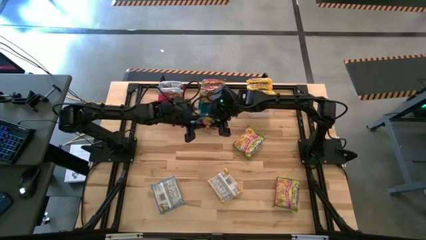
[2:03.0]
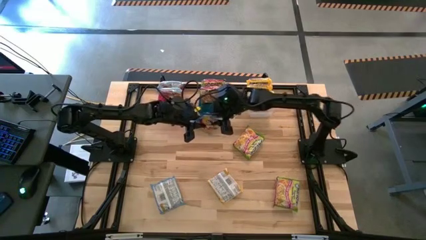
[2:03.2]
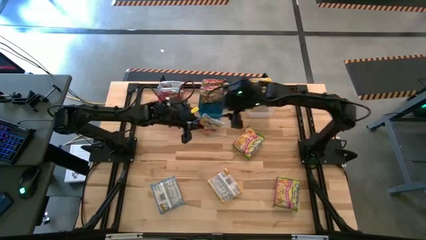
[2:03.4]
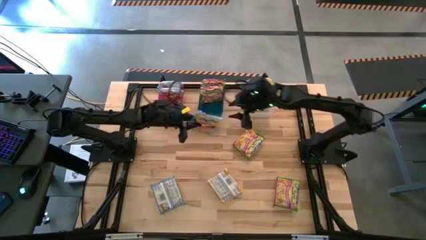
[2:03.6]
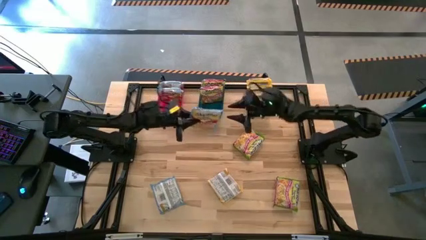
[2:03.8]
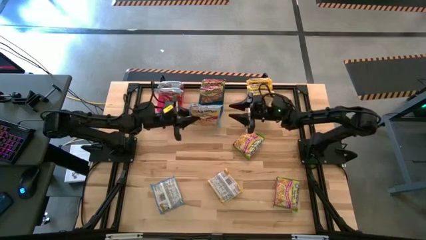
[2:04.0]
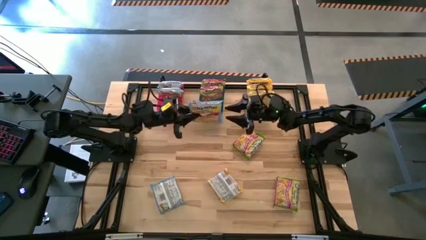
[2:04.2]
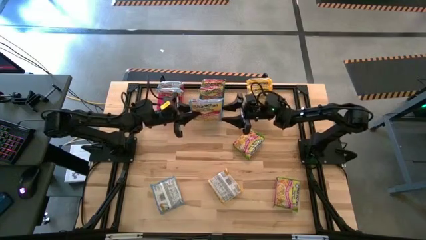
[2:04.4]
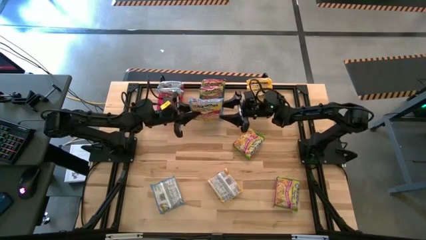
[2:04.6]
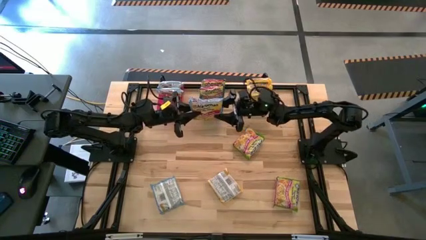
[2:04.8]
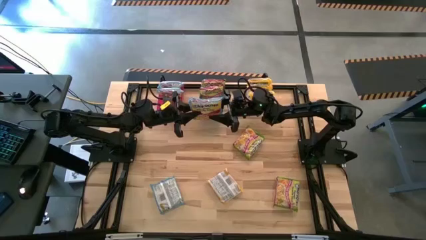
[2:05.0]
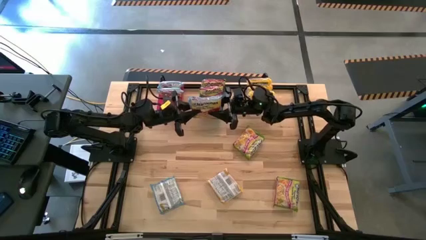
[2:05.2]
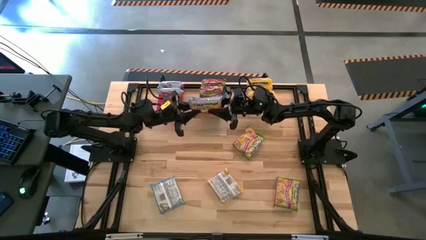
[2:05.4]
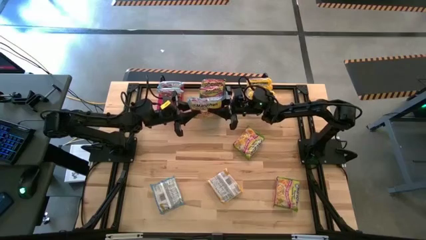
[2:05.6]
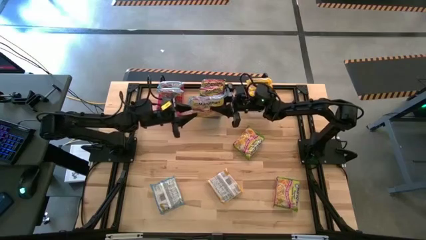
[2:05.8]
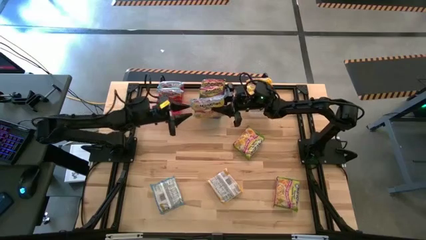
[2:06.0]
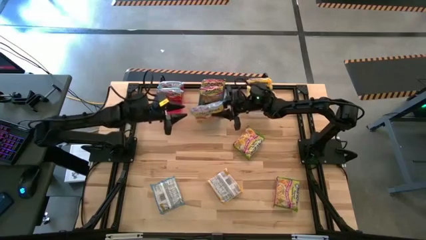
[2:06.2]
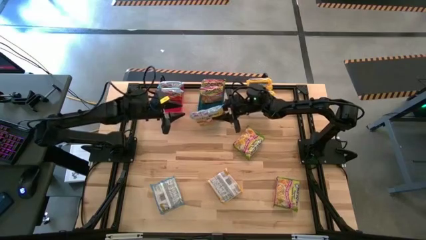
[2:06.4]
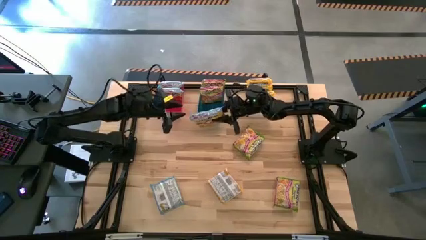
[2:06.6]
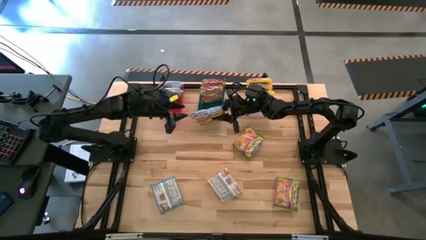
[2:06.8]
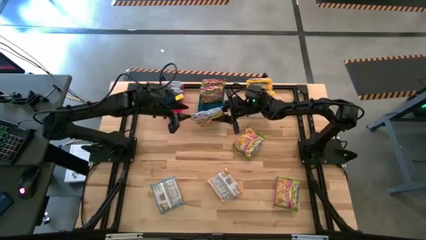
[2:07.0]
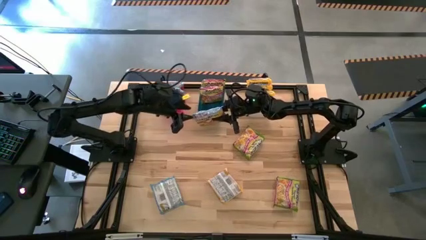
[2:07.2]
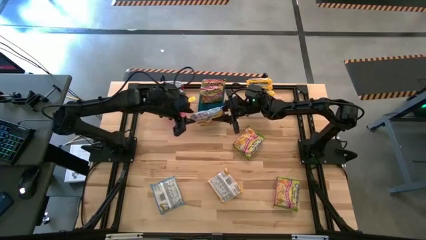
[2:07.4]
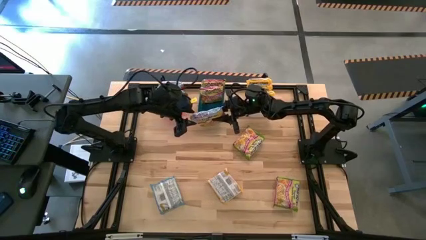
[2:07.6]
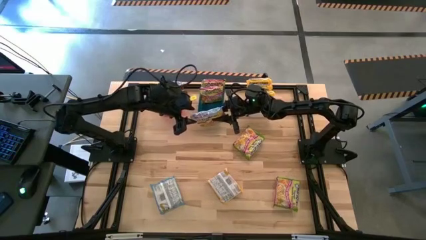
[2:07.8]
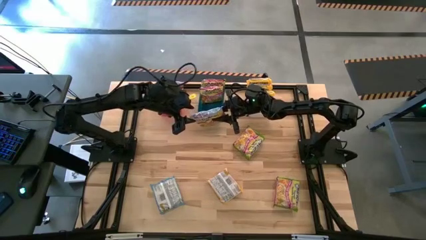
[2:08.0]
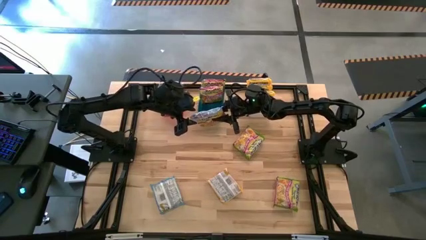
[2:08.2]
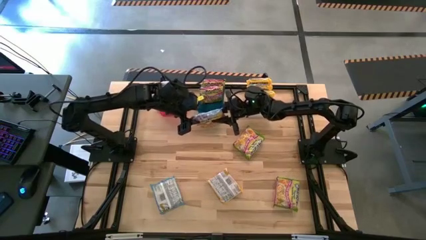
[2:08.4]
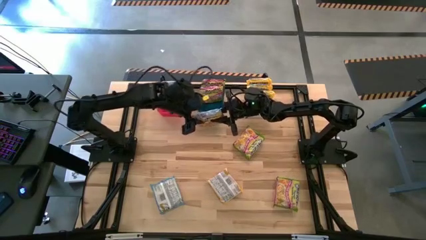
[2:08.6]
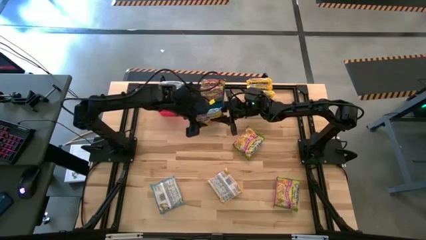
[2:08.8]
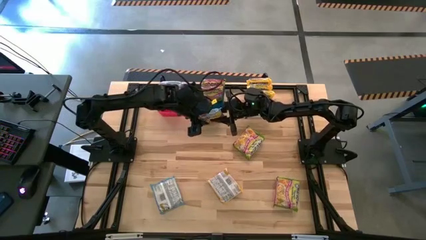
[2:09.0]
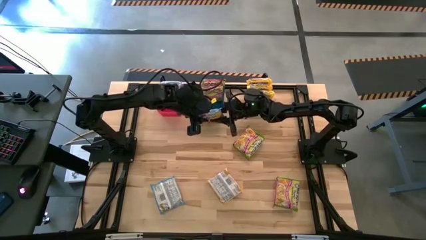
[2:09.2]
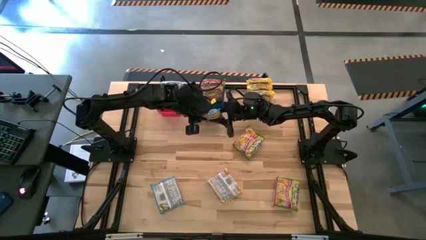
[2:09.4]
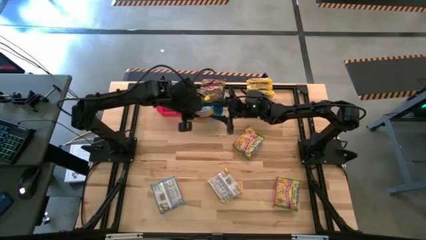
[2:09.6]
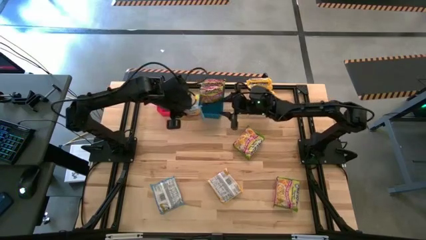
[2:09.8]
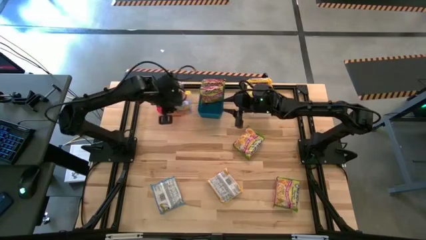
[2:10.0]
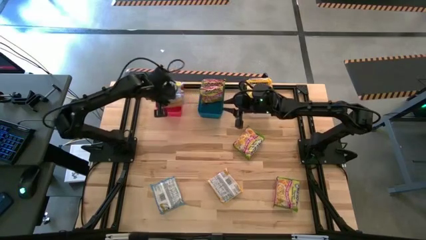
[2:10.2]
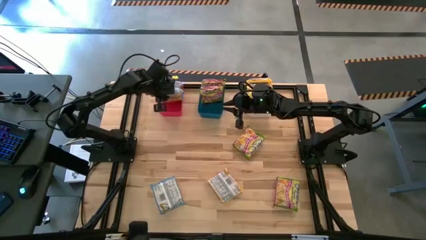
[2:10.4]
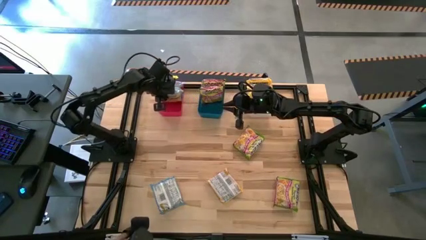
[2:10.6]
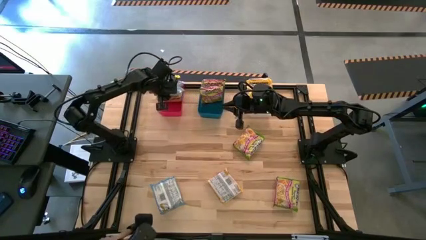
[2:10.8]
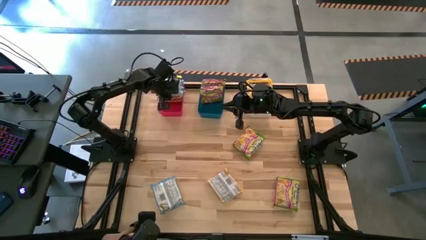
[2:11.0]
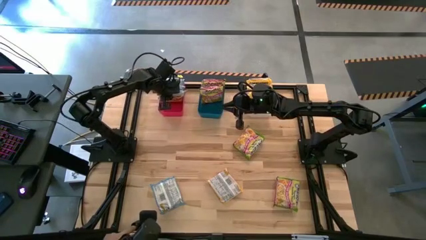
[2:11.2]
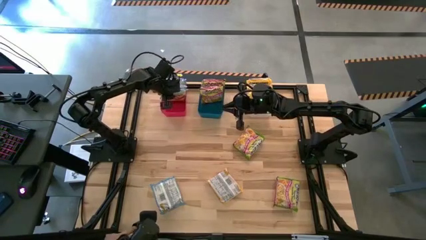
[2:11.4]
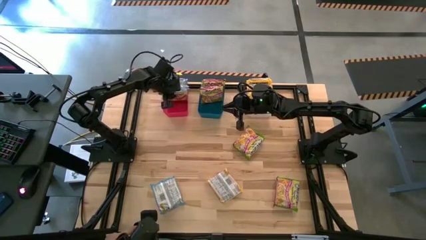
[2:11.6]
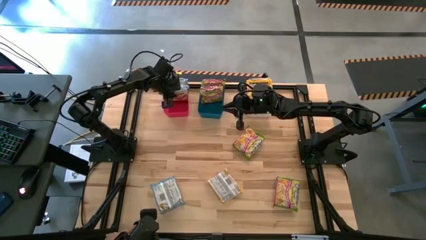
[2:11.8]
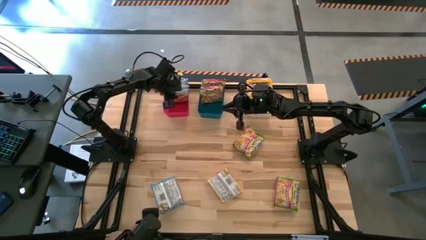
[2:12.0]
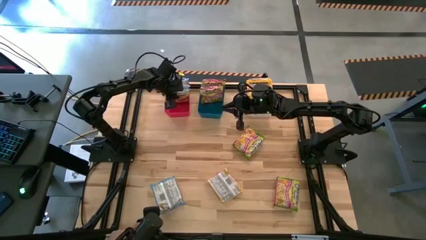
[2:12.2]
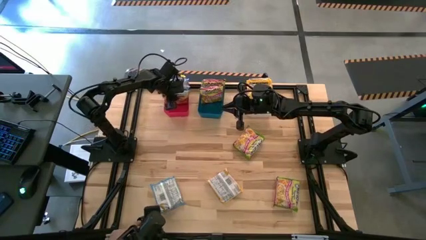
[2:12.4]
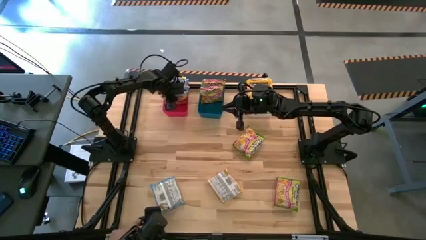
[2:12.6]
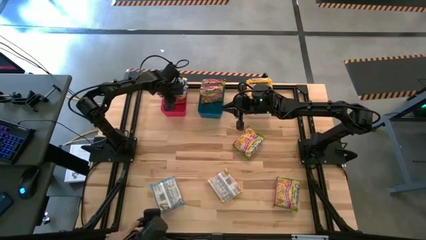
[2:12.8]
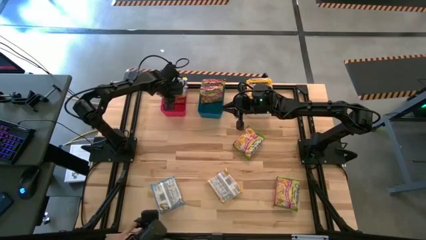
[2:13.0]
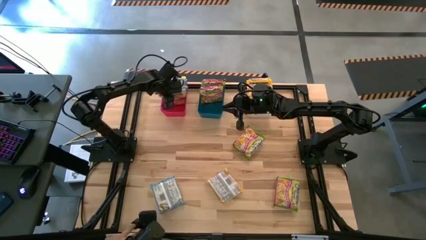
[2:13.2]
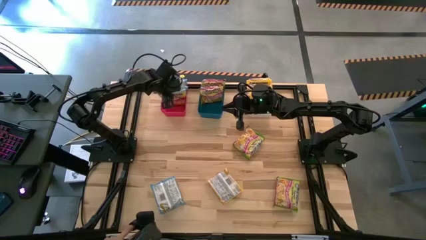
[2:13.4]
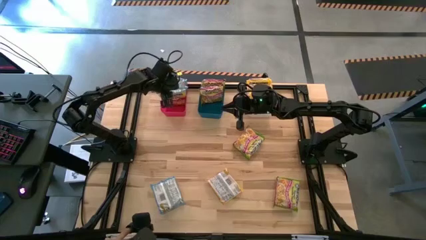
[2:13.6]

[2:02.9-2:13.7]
Task: Sort Maruchan noodles
Put the top blue noodle pack into the red bin
